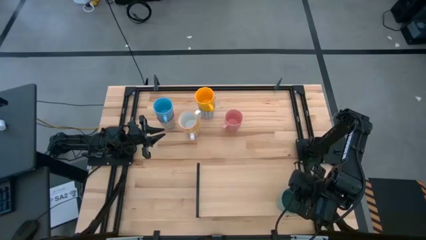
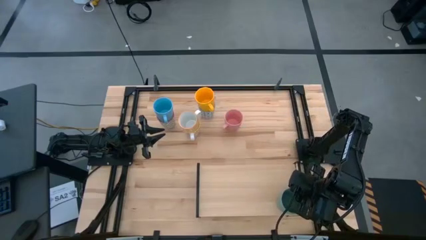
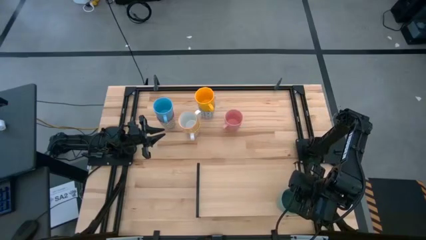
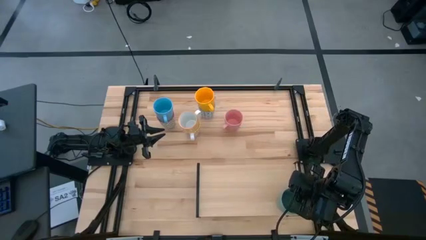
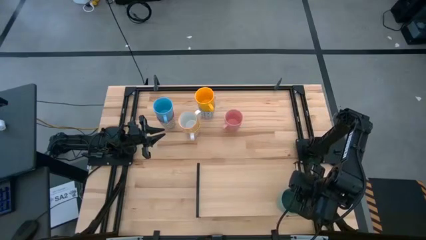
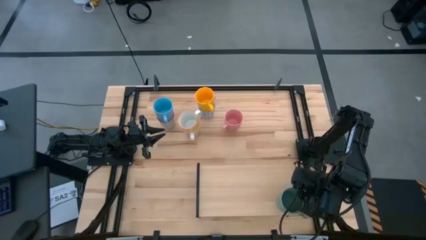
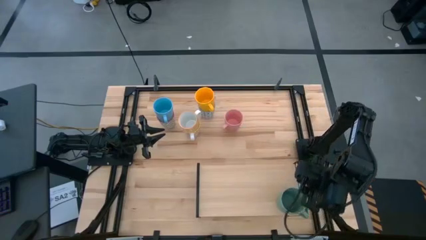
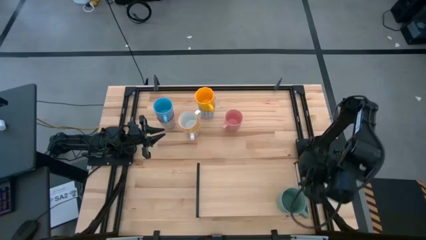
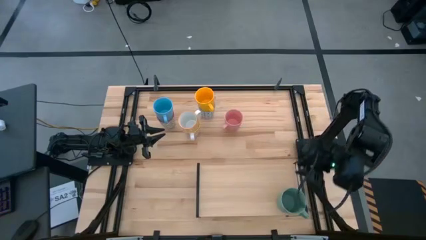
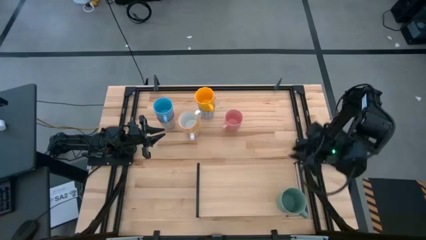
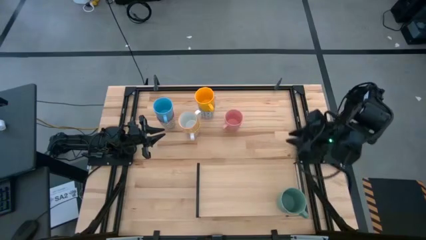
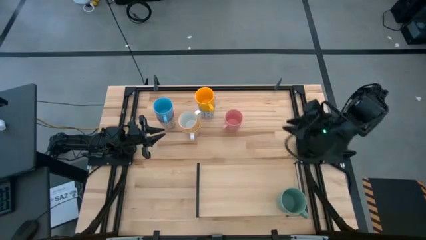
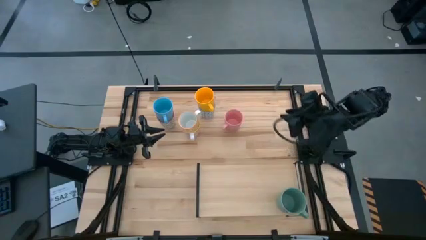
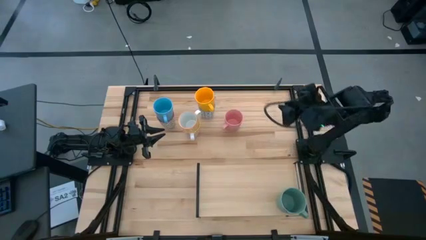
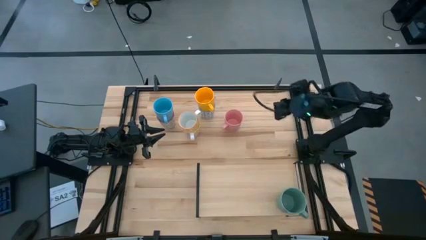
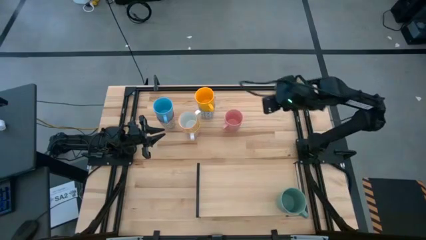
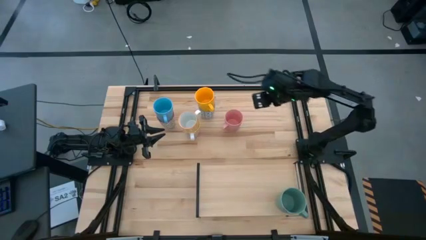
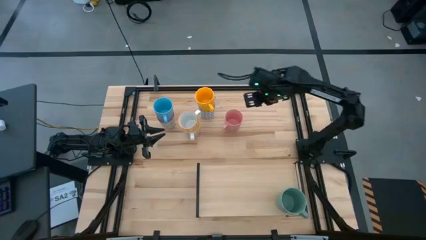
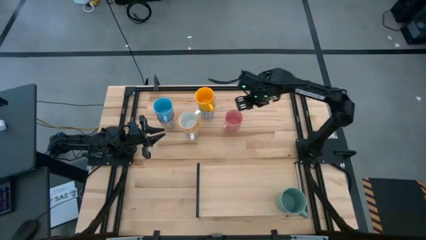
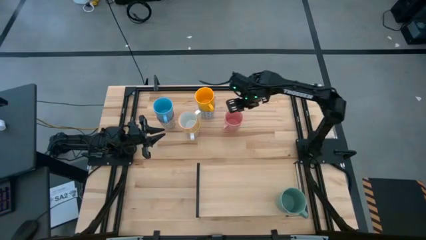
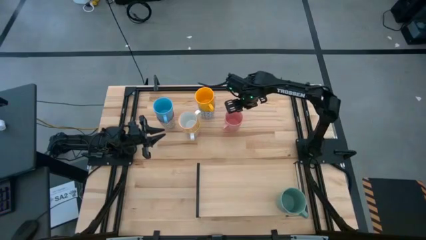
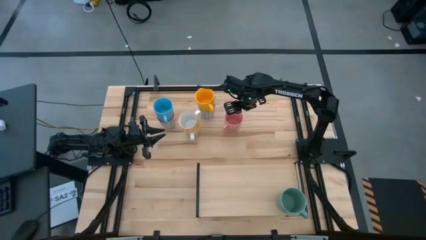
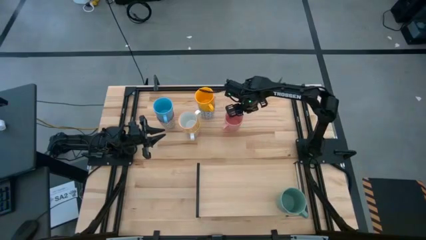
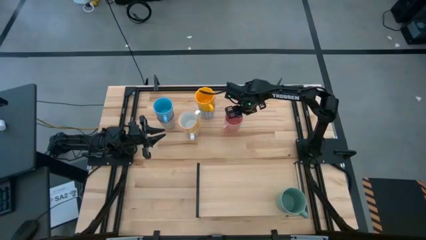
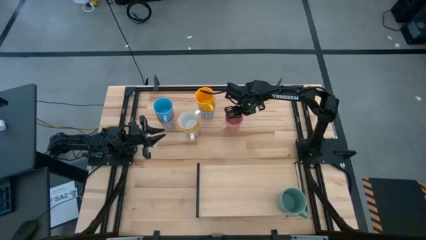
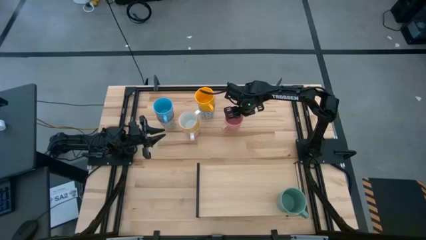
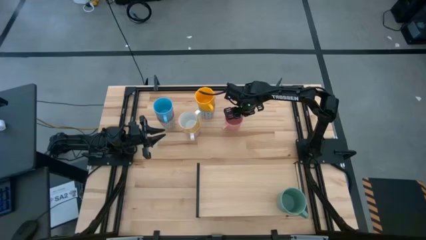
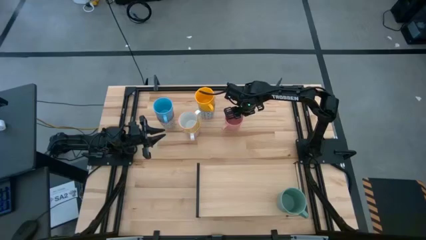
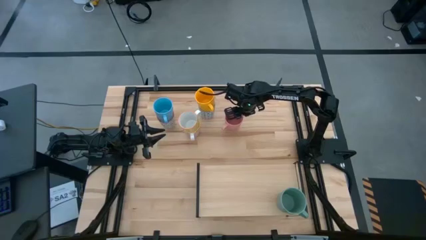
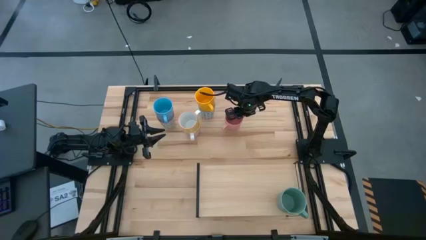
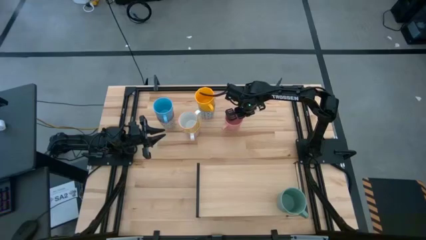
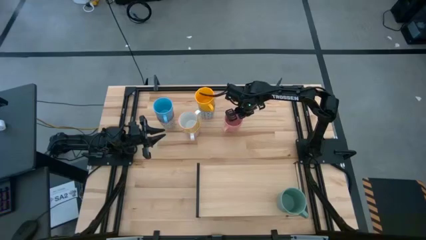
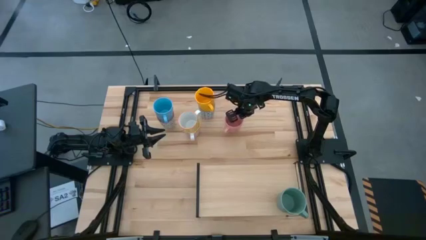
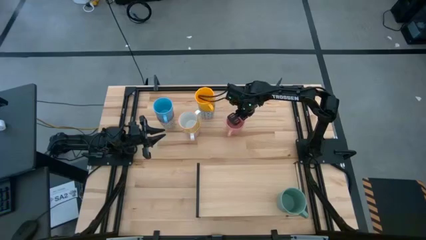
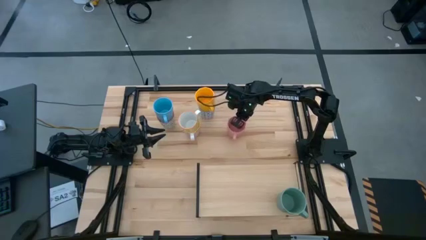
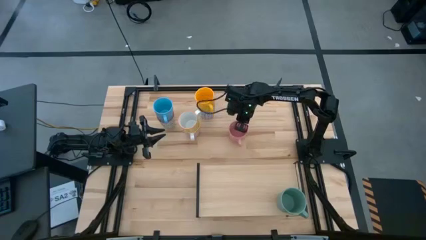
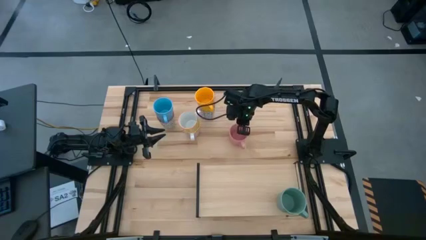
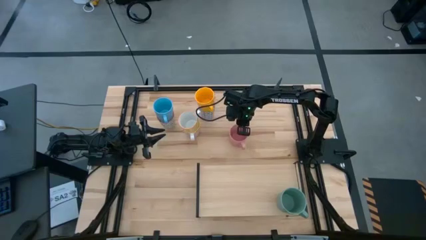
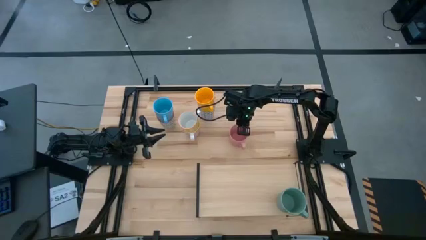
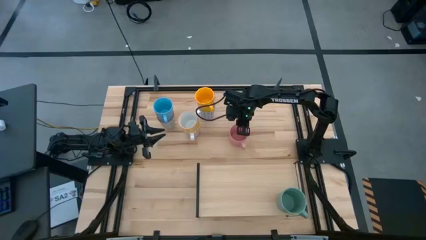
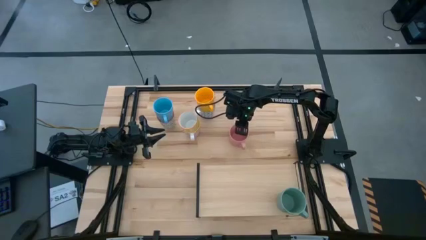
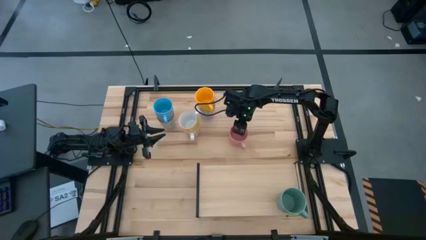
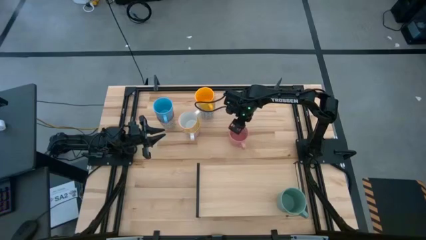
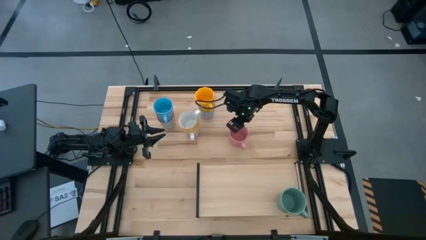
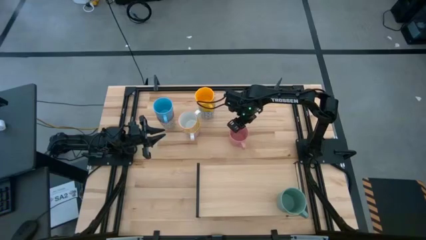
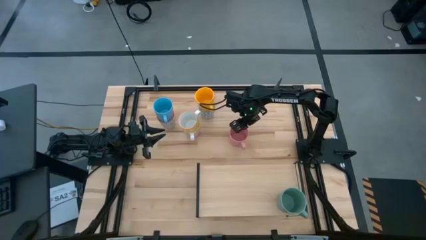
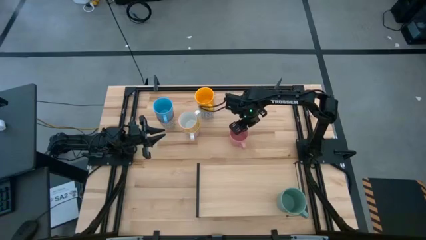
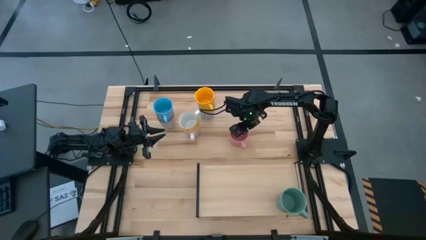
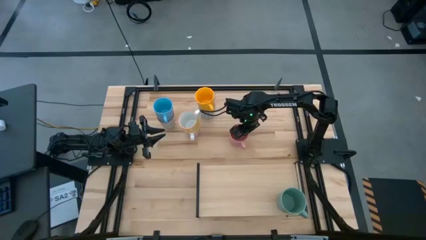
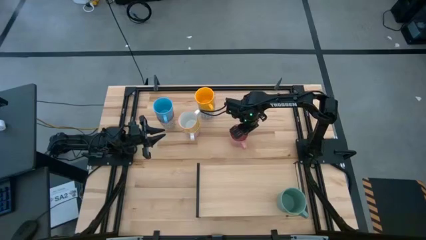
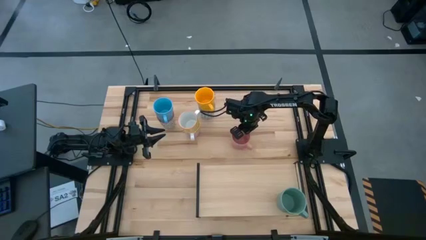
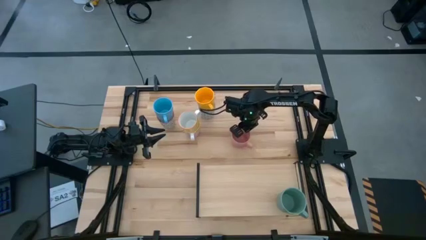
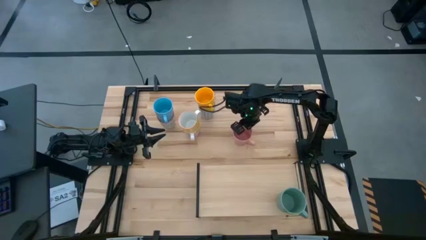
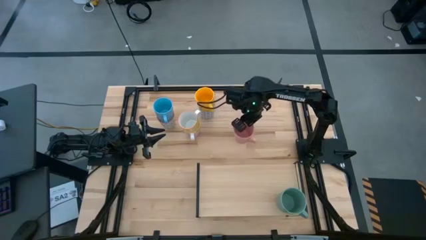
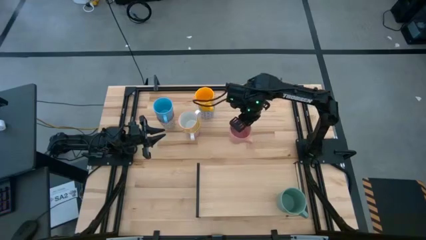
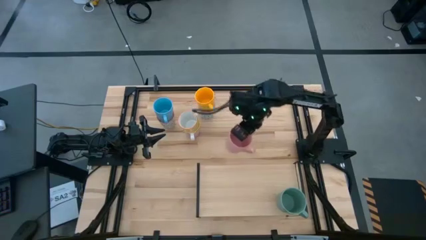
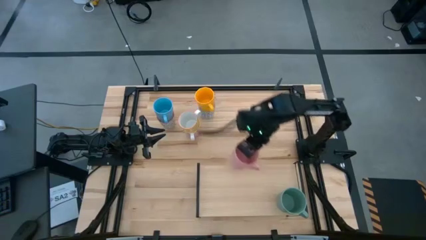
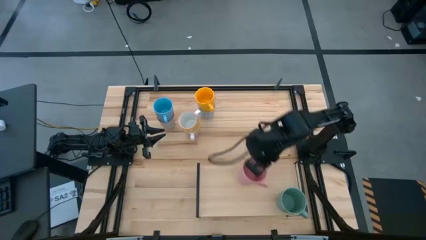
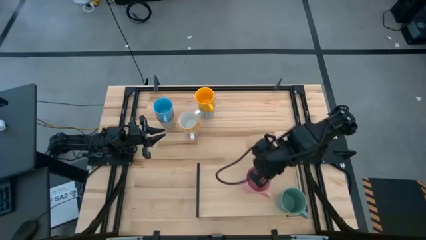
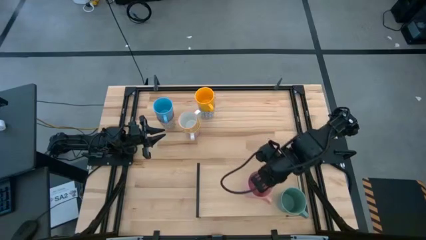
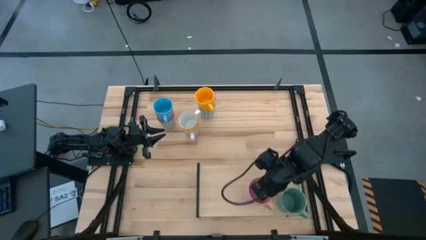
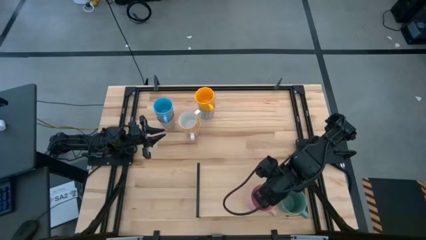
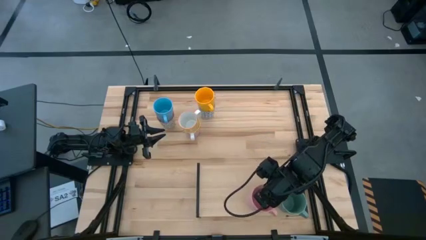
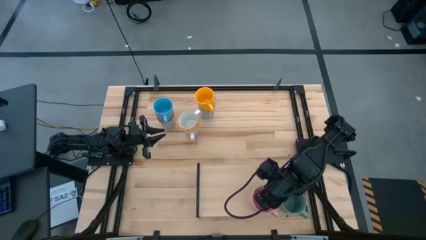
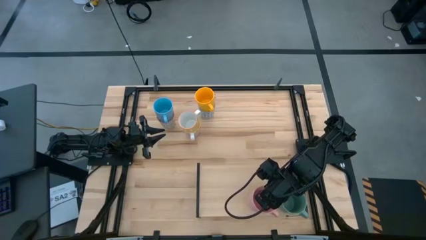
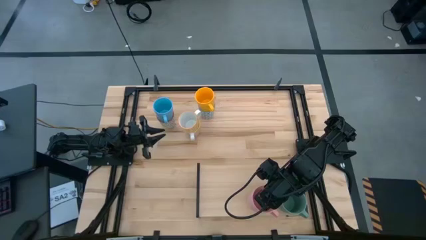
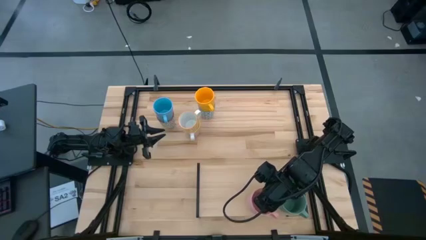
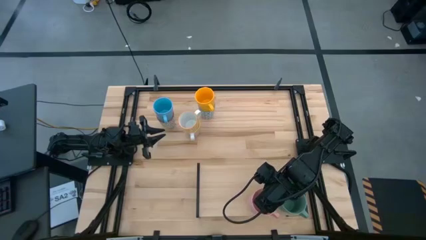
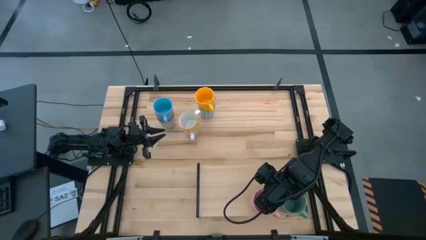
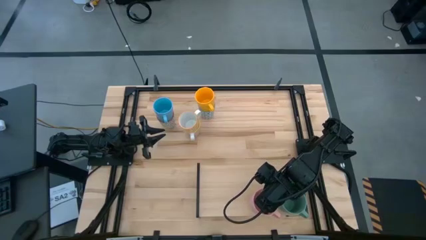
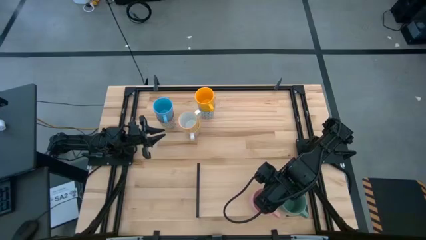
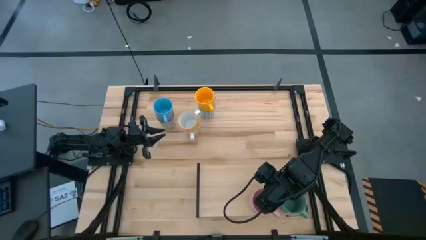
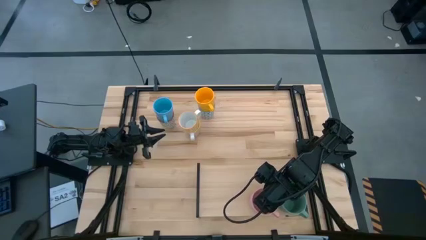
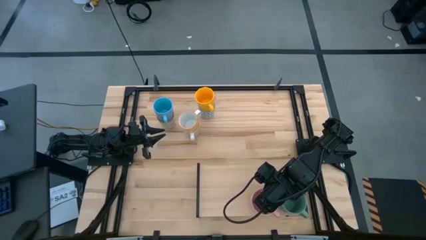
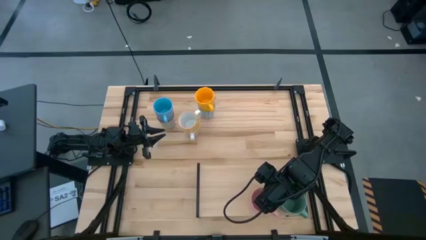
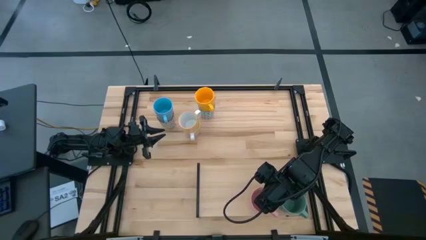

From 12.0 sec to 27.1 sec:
Task: Place coffee mugs
Put the pink mug on the shelf
